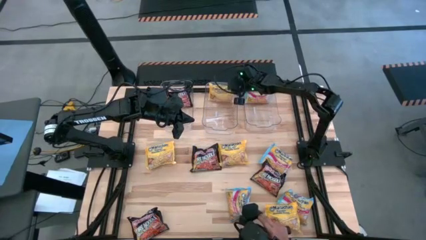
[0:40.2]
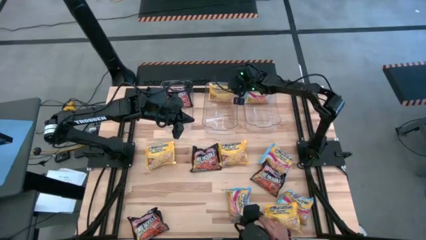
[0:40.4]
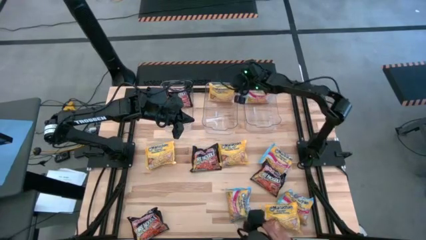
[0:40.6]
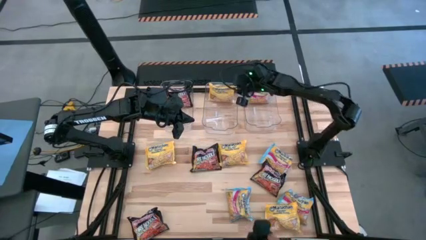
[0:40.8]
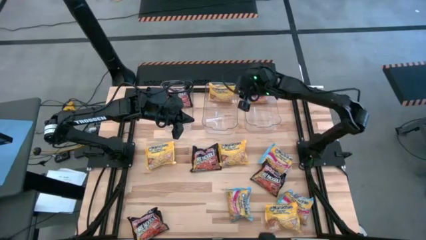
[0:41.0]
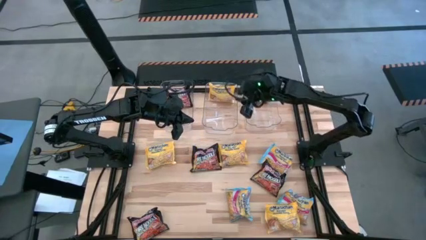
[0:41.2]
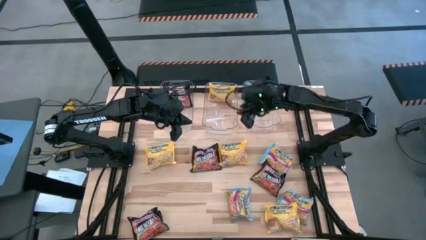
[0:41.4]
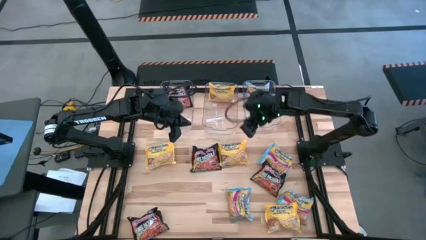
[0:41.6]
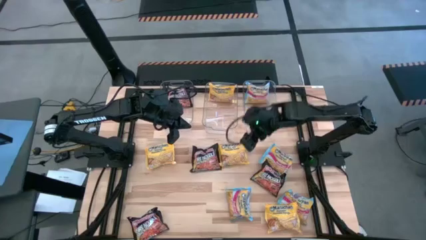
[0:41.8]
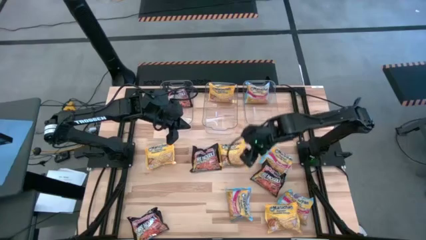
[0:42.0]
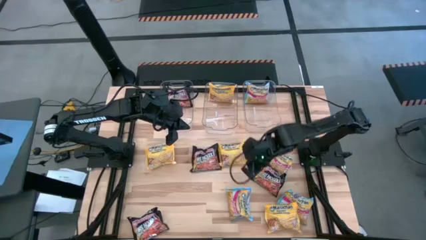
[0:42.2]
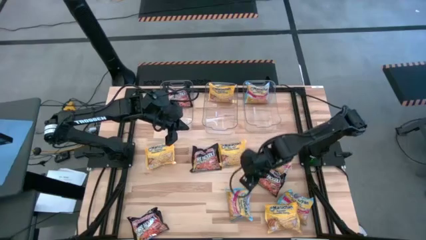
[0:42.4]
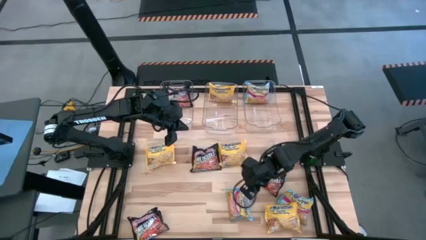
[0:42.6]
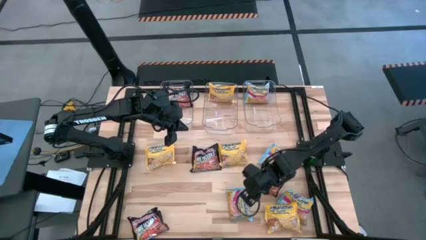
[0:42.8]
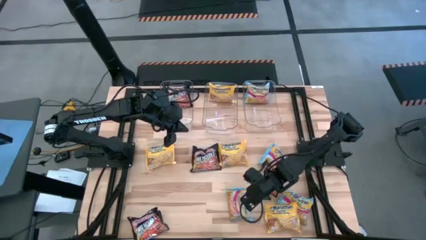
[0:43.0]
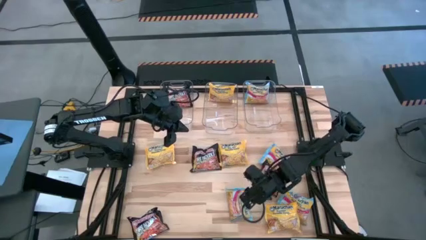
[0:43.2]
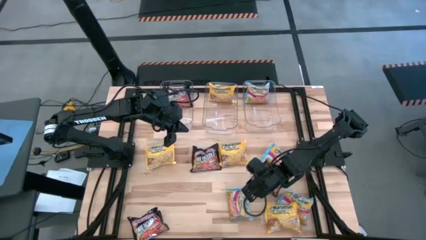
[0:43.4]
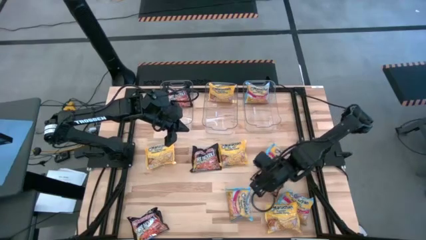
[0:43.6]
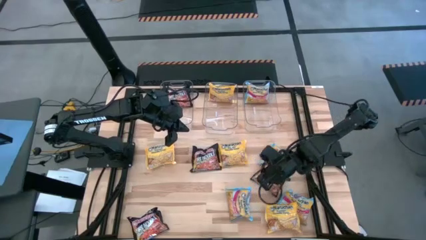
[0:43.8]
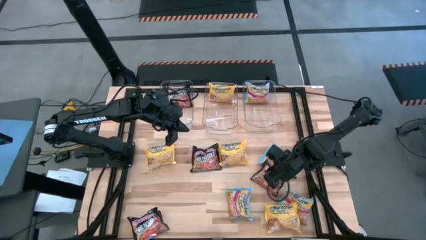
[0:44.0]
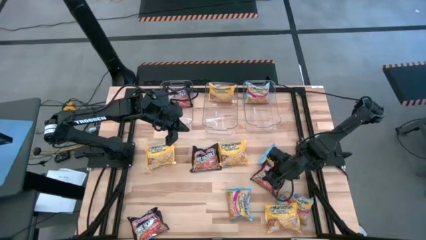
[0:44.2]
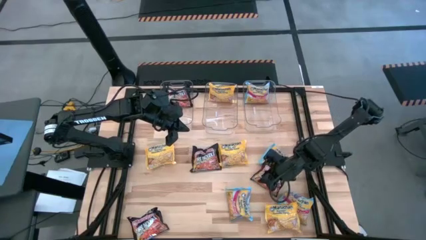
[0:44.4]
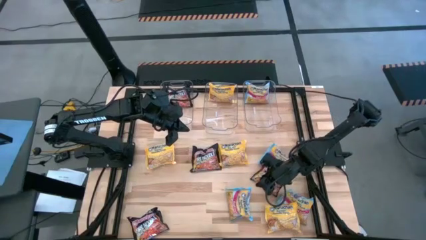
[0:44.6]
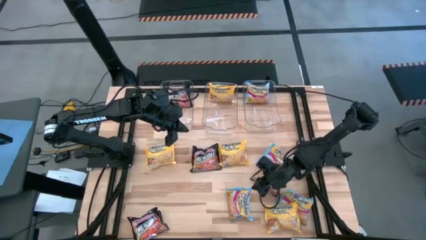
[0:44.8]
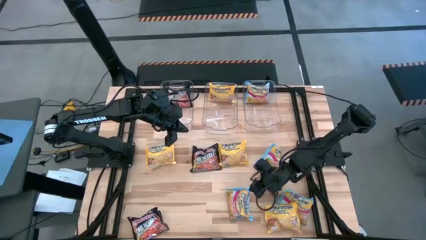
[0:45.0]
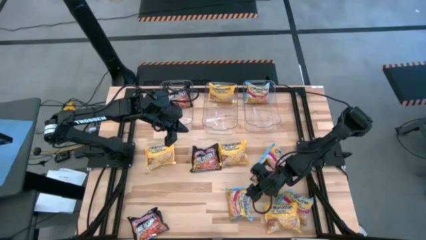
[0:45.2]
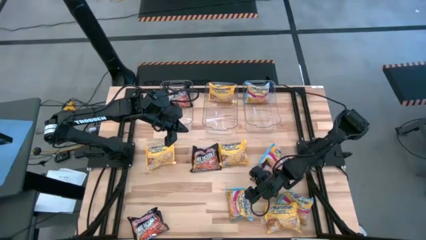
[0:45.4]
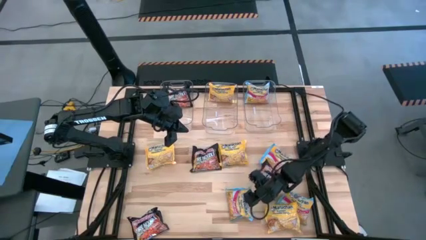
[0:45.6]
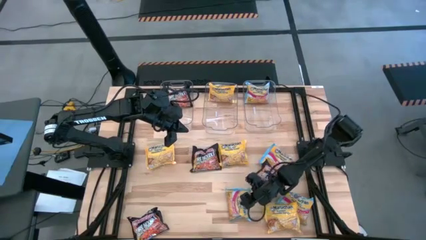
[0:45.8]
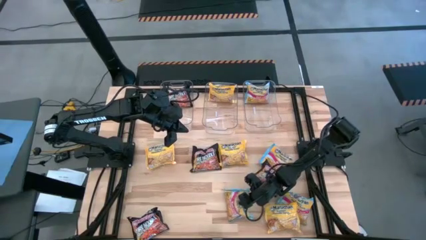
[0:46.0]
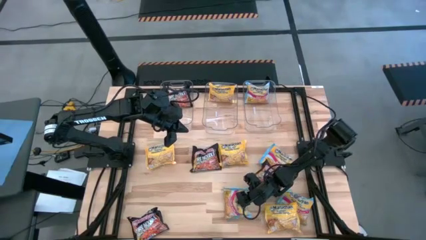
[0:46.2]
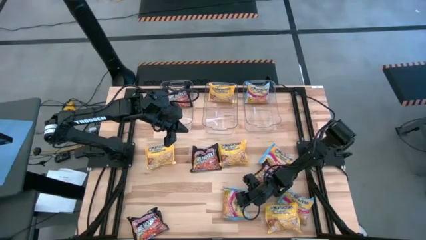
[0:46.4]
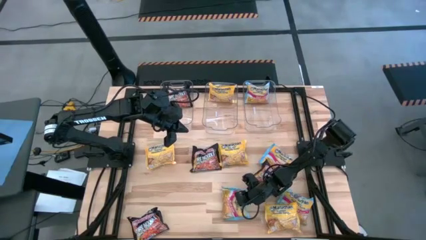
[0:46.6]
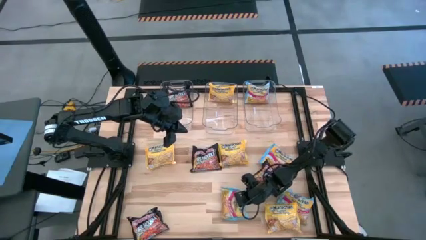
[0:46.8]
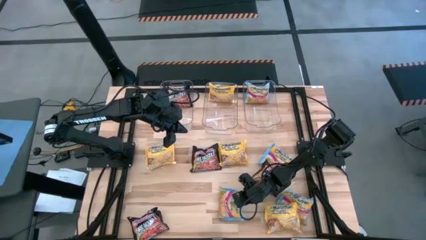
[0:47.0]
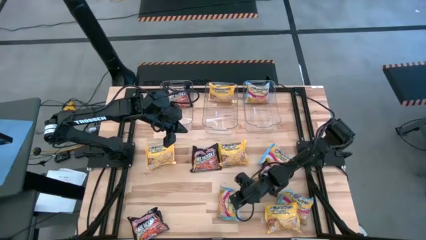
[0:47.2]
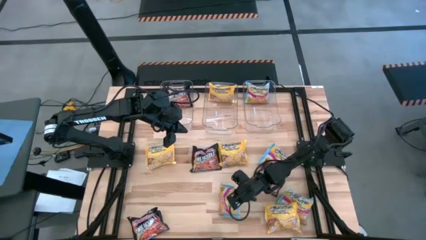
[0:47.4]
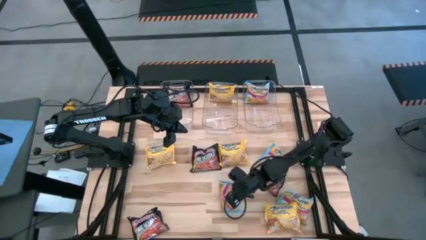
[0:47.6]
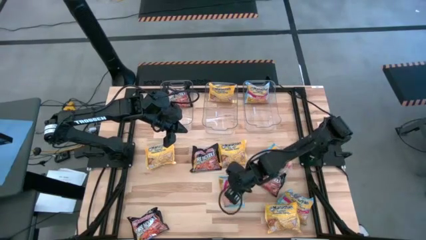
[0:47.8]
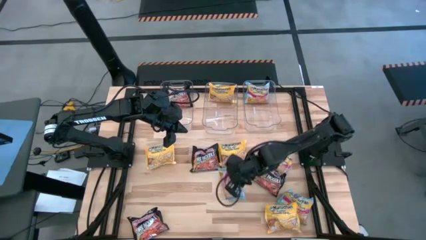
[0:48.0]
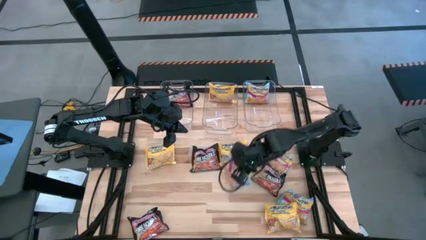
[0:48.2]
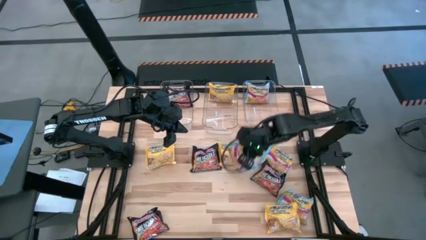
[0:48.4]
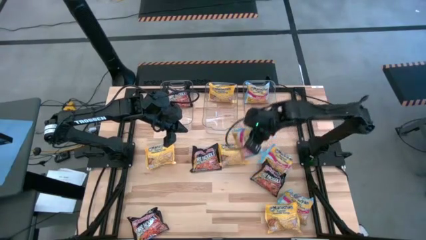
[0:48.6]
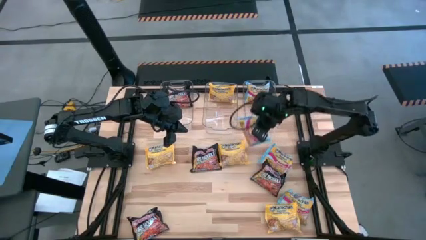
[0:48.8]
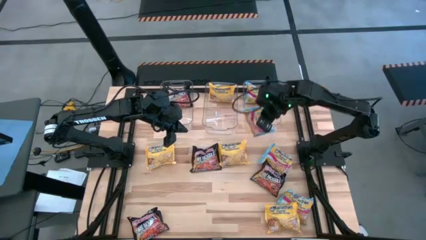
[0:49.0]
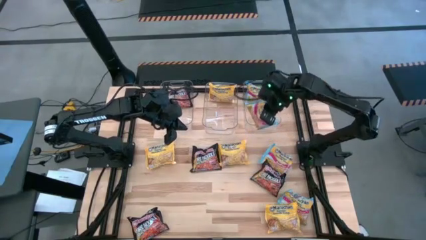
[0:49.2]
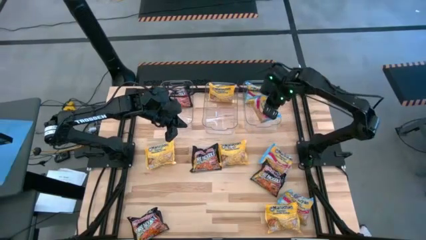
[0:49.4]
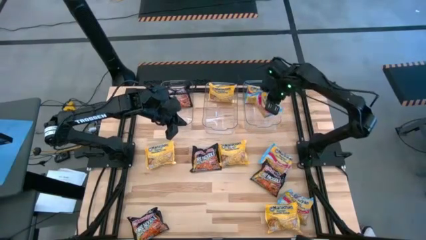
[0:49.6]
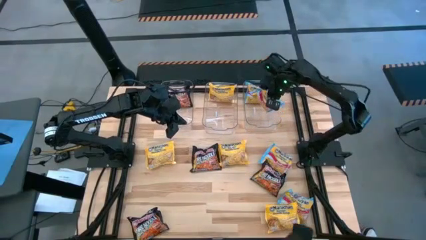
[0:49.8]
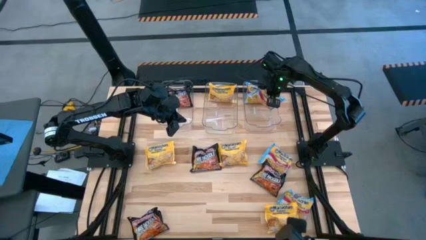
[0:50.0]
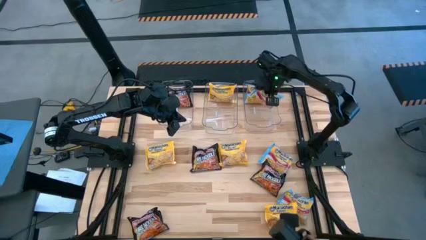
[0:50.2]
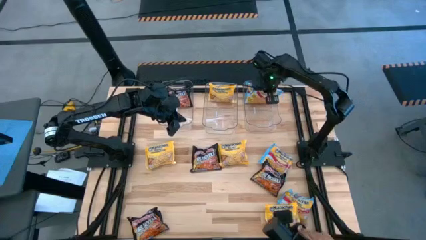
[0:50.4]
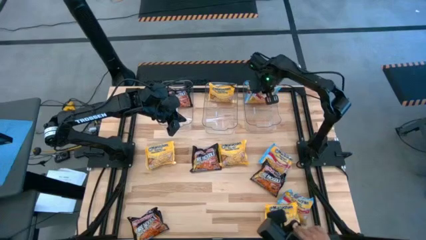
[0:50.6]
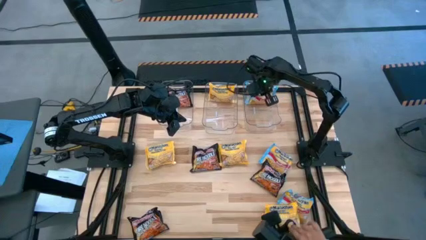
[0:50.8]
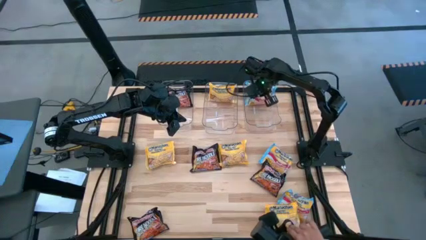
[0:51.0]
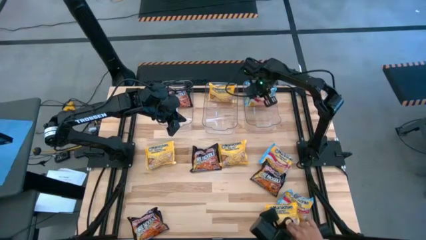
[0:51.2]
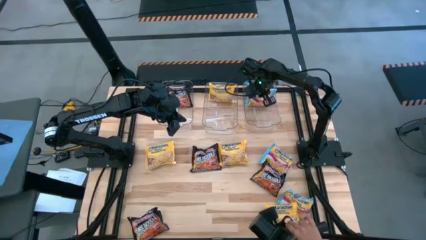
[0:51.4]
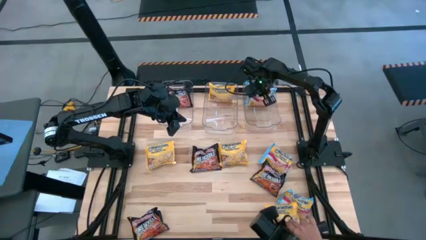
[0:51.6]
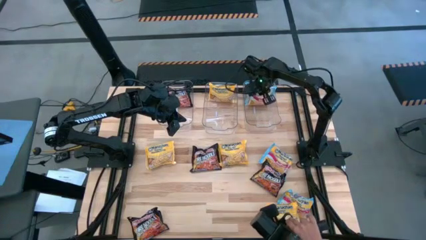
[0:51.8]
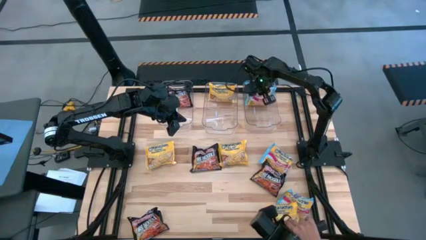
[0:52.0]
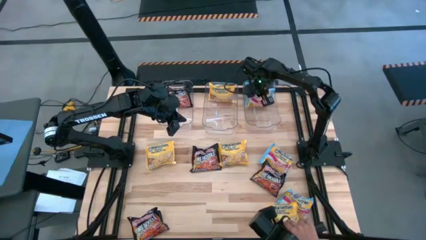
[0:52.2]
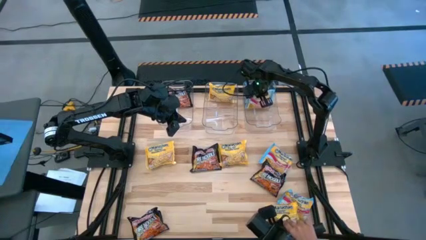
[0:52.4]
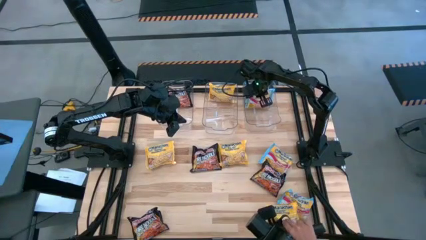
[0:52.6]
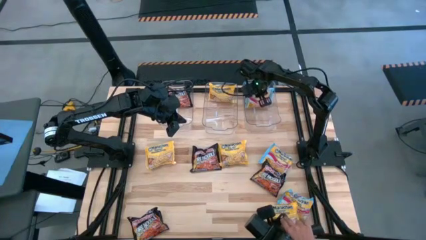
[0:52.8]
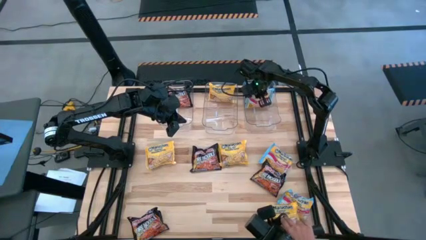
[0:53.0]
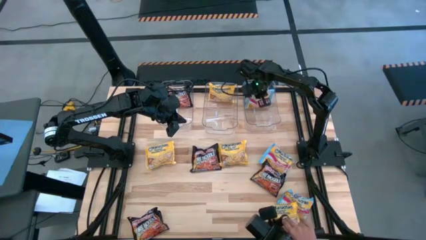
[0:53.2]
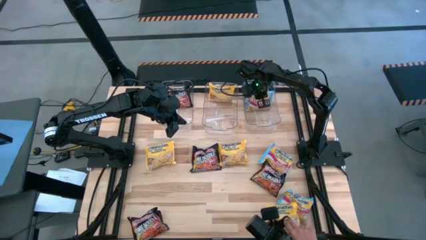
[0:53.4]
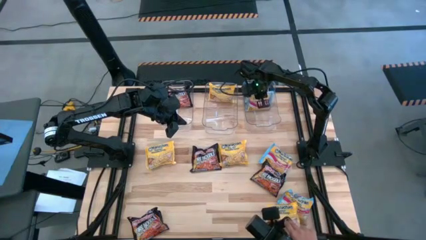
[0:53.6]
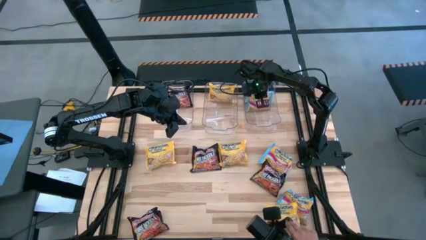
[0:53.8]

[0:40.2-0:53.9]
Task: Sort Maruchan noodles
Put the blue noodle pack into the right transparent bin

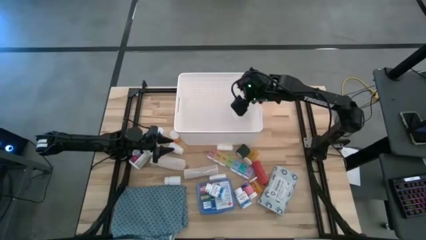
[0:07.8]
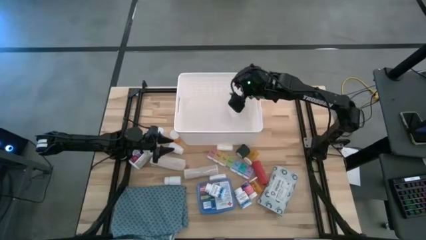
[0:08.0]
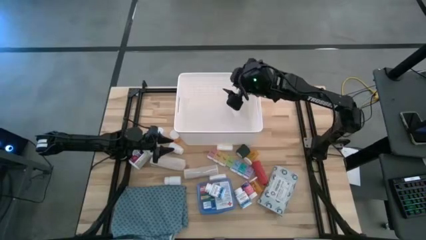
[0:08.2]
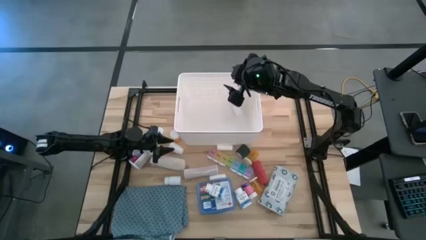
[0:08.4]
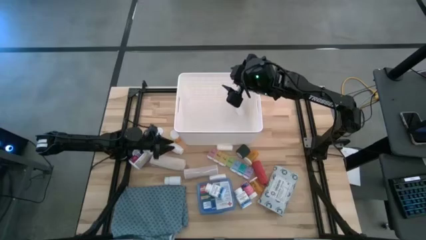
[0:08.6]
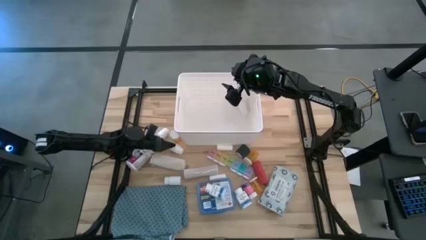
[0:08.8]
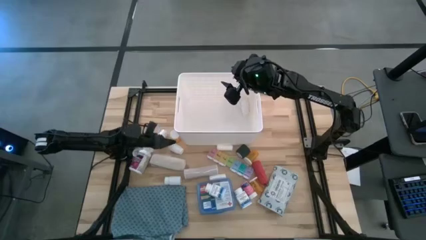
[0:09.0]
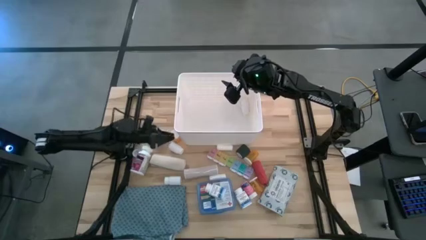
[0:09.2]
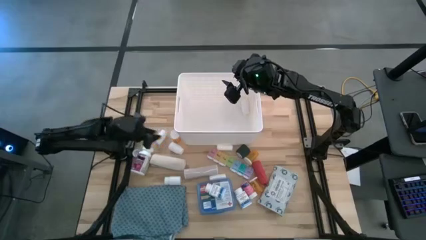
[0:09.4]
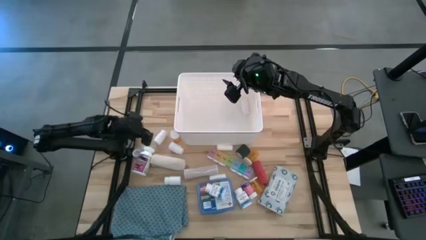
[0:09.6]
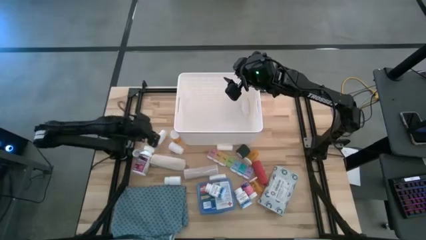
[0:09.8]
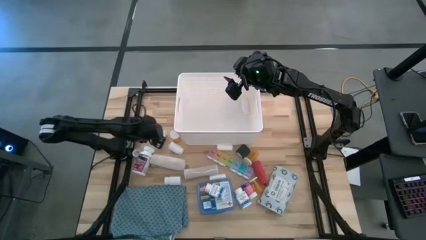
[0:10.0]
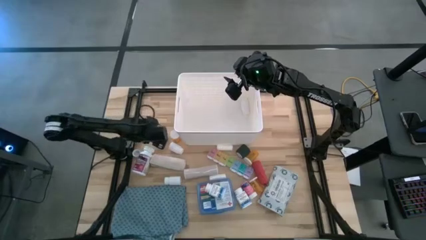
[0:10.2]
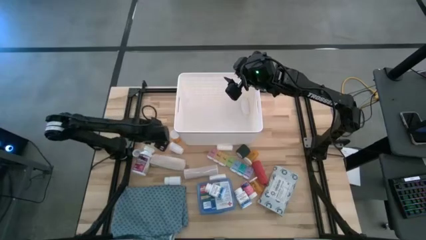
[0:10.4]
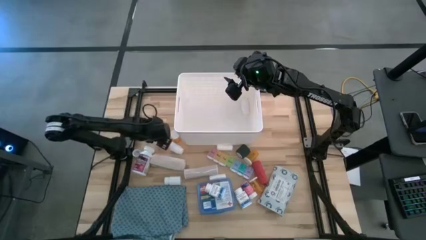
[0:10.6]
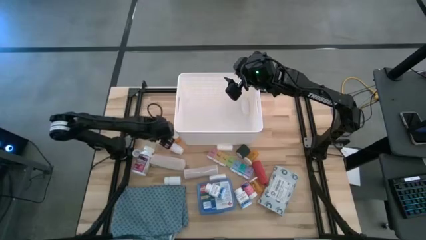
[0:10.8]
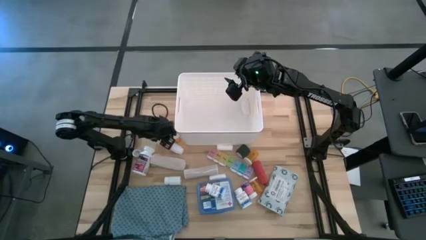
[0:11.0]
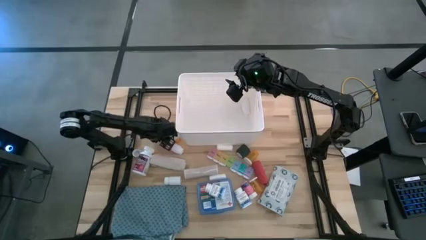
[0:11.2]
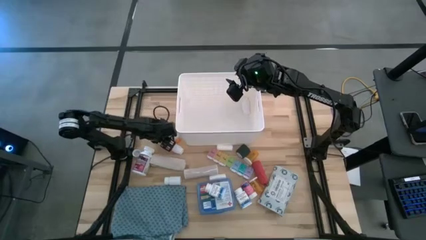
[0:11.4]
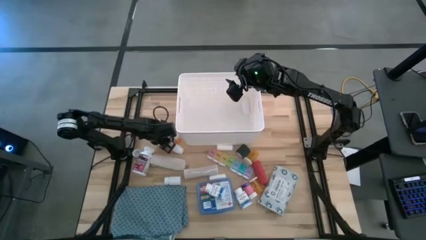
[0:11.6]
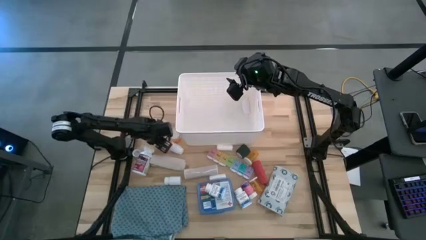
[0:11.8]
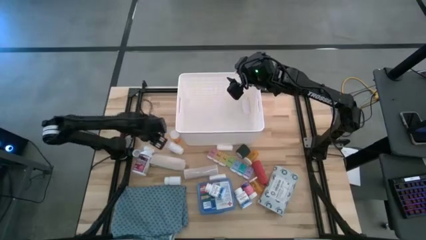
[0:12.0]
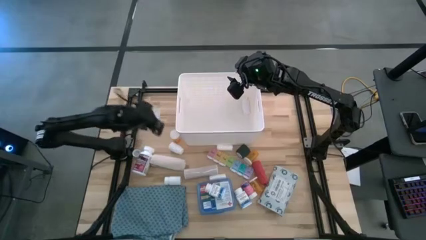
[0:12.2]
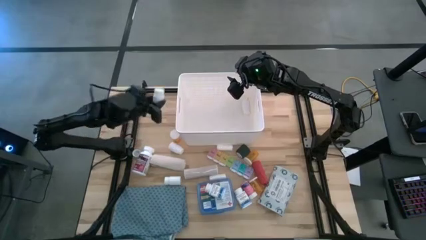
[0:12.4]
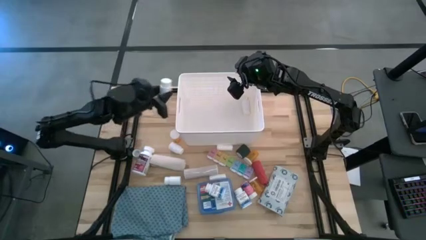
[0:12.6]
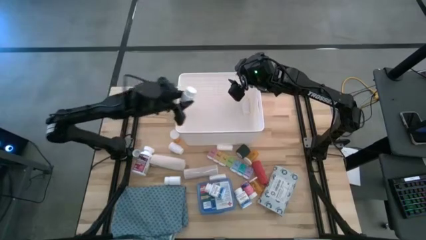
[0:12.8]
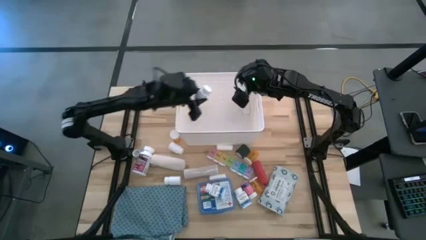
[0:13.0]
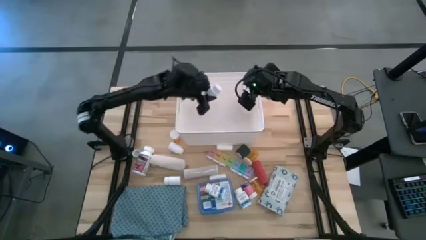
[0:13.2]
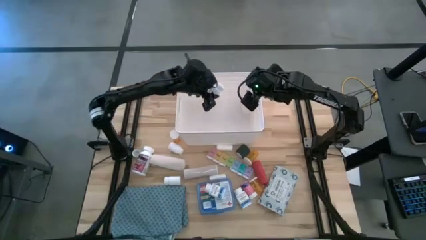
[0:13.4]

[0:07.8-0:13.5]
Task: Pick & place medical supplies in basket/bin
Put the white medicine bottle into the bin
